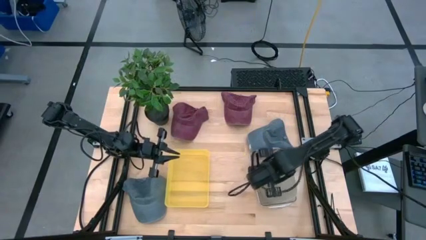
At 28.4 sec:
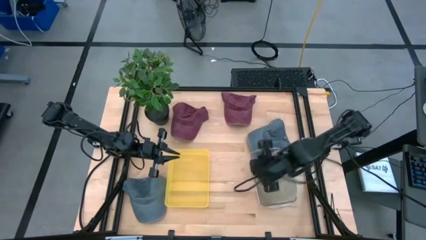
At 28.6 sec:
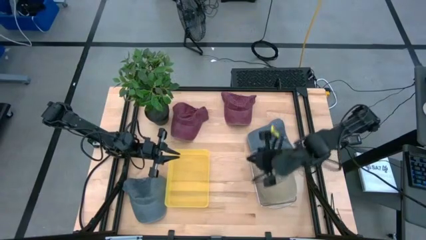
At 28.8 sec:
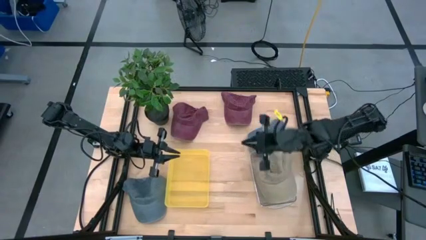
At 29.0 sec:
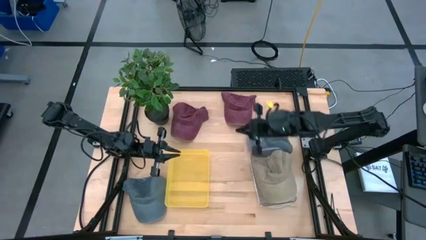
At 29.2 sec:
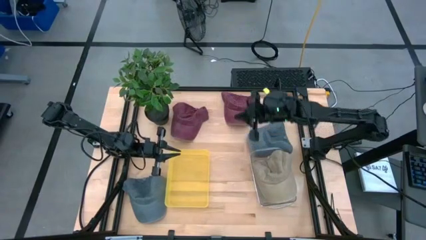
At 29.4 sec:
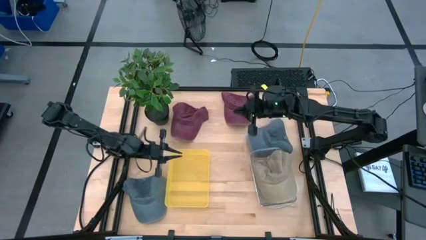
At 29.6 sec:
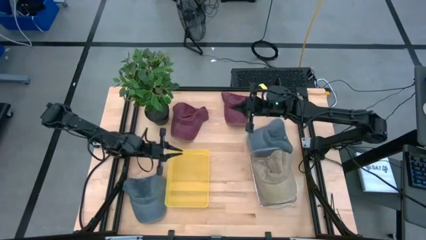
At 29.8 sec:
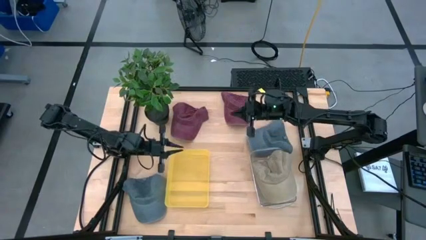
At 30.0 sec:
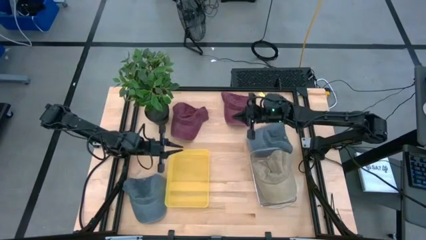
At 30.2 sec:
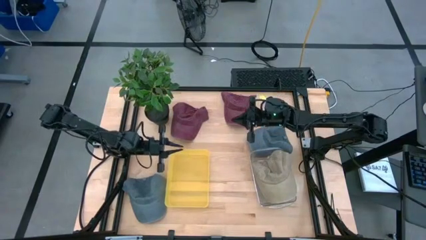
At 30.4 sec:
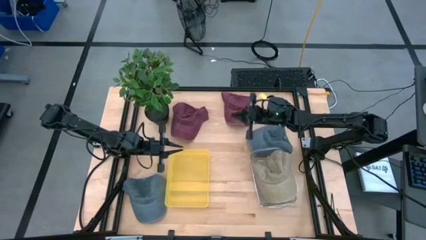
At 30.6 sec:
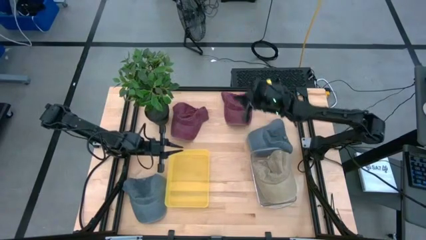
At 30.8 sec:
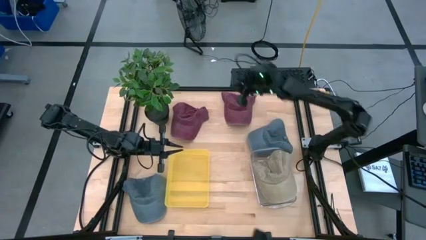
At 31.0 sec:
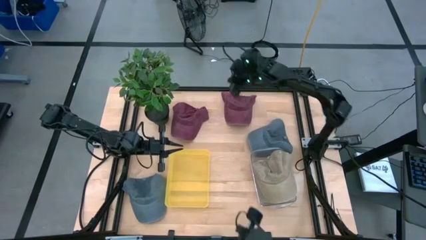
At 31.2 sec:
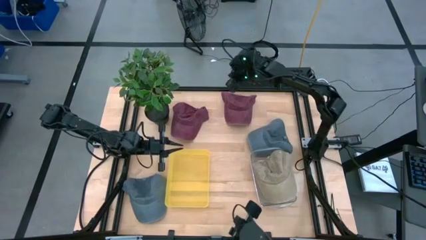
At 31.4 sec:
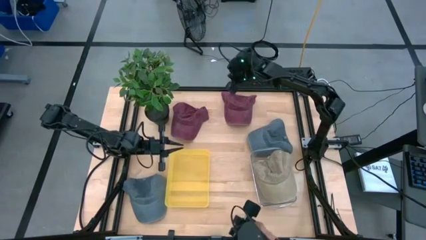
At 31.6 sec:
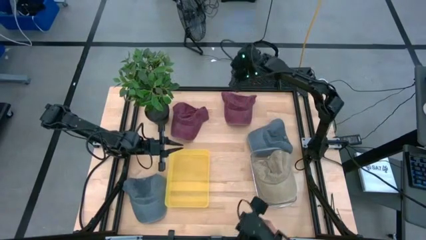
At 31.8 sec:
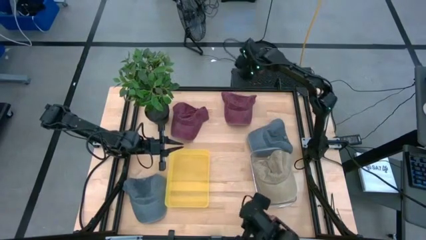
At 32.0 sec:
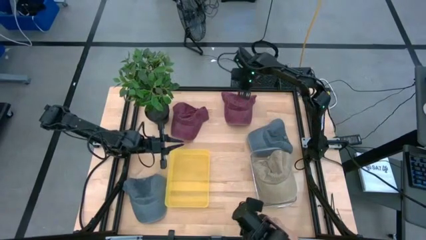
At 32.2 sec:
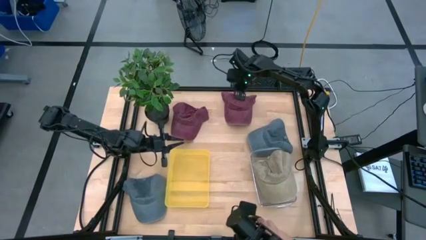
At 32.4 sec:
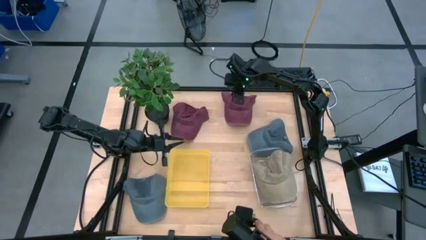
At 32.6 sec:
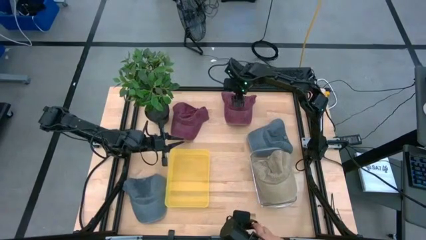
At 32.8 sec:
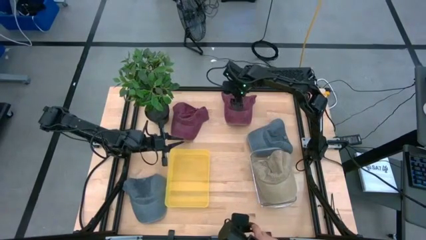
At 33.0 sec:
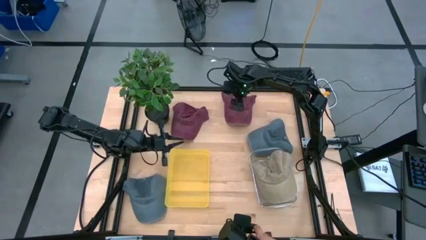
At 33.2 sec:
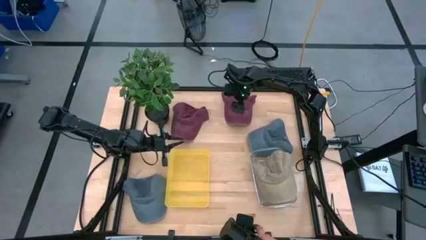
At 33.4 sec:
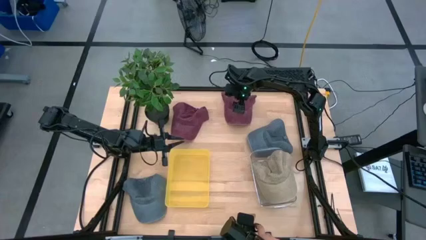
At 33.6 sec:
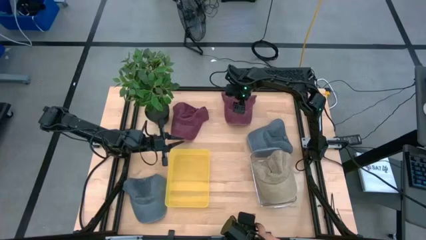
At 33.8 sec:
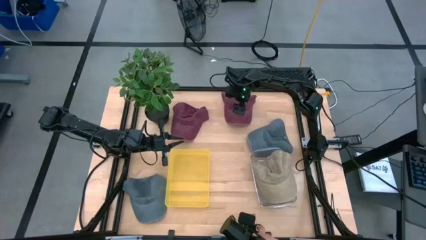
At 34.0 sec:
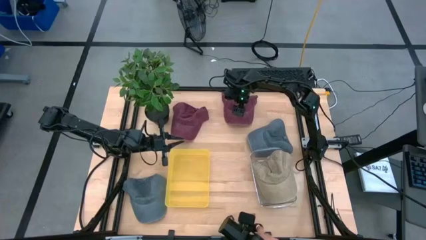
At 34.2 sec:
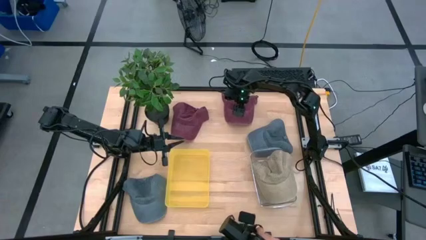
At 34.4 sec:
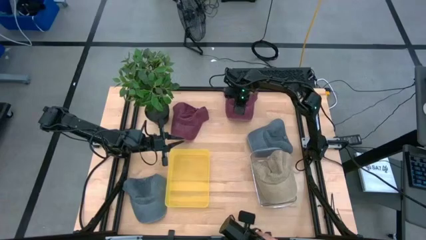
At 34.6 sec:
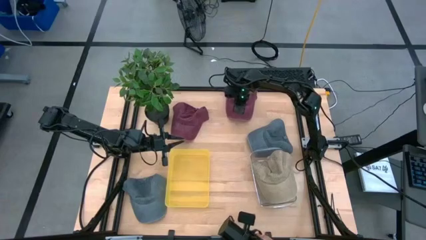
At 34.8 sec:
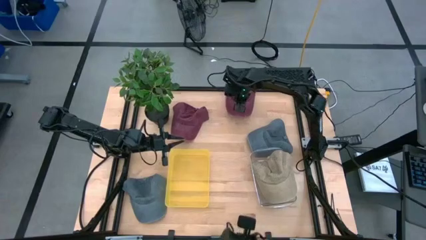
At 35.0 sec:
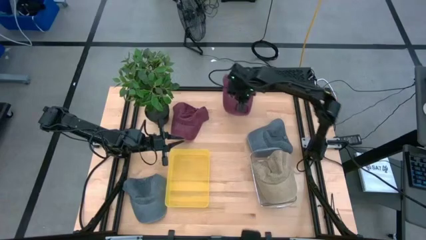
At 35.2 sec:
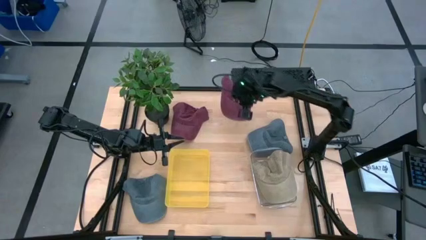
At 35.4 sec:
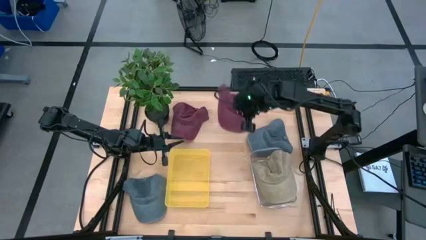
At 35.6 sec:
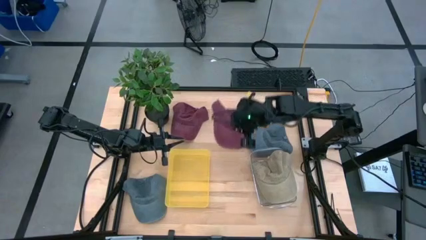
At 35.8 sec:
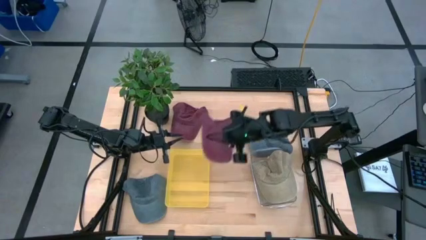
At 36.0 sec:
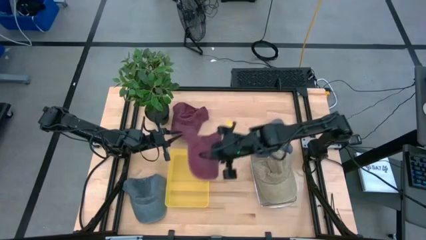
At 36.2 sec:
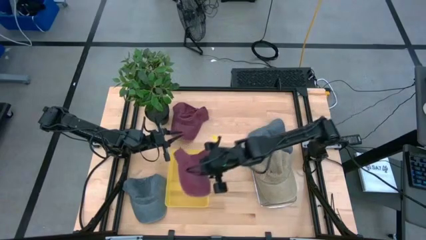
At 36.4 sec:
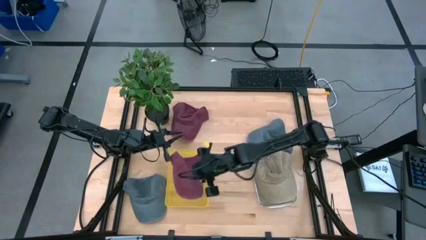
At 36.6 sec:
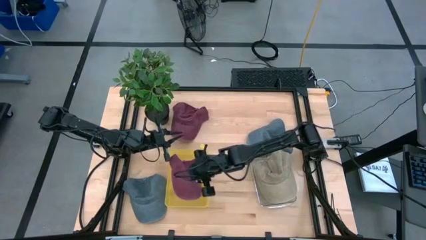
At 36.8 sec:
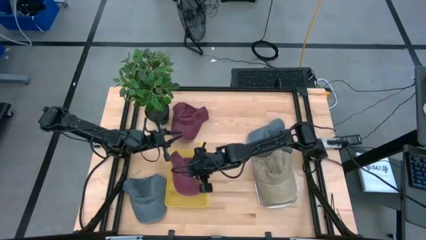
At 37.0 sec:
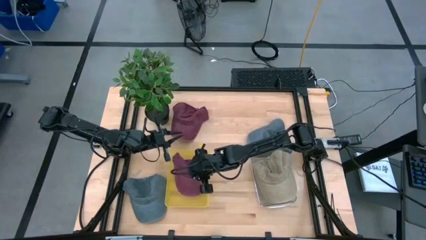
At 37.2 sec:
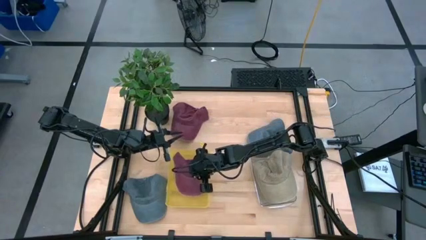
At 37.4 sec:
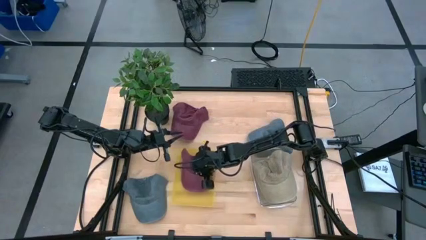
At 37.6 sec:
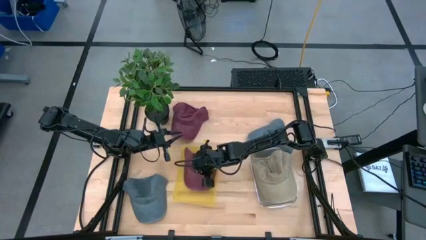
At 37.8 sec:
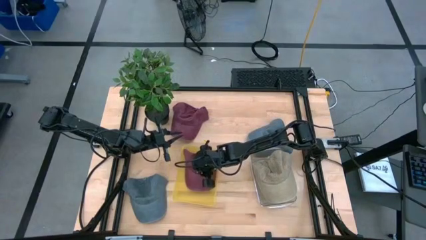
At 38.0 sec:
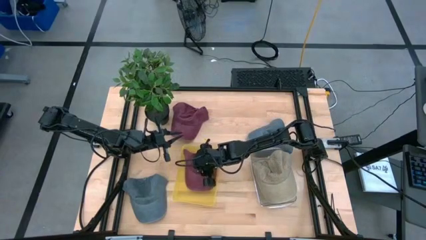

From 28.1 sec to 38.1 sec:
Task: Pick & Place hat
Put the right red cap into the yellow bin
